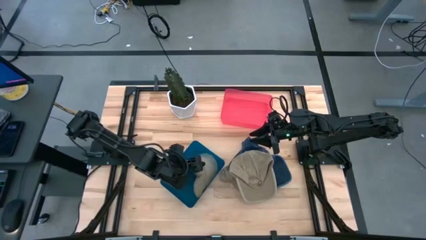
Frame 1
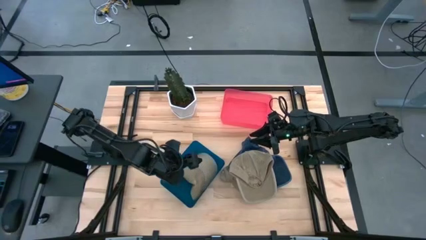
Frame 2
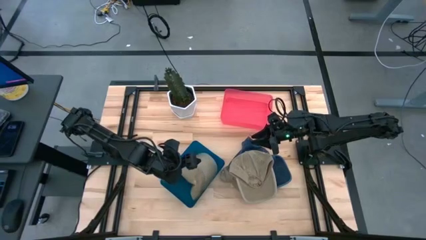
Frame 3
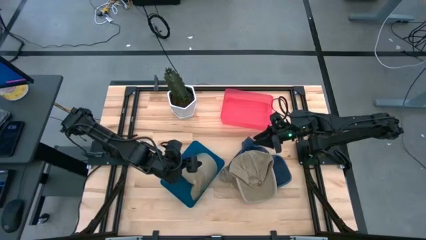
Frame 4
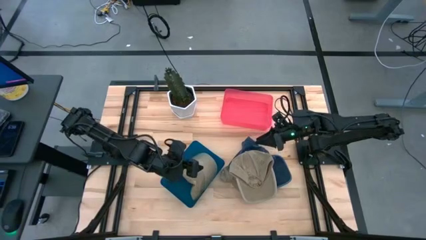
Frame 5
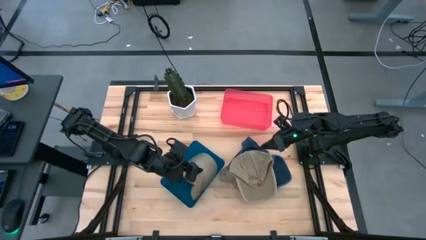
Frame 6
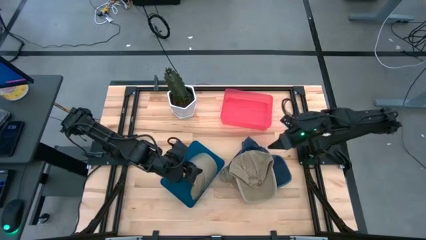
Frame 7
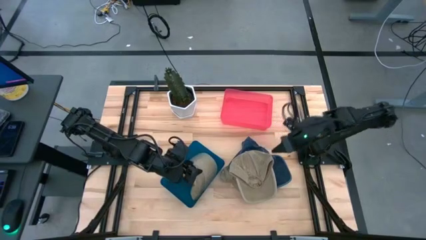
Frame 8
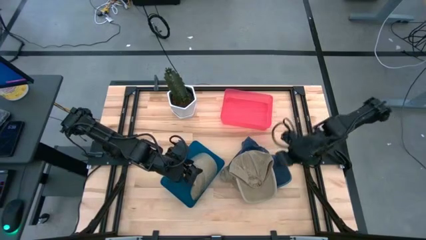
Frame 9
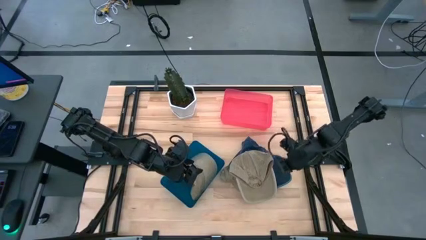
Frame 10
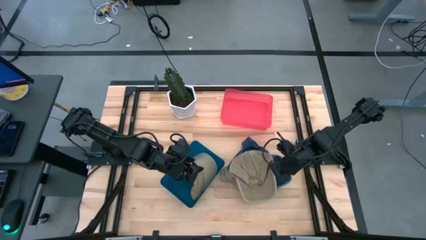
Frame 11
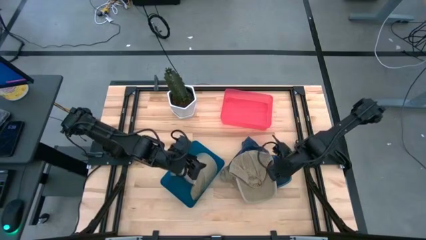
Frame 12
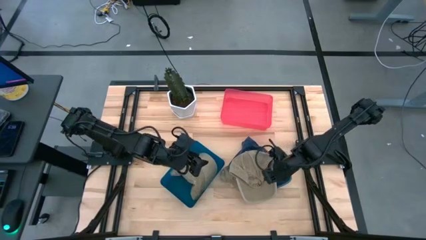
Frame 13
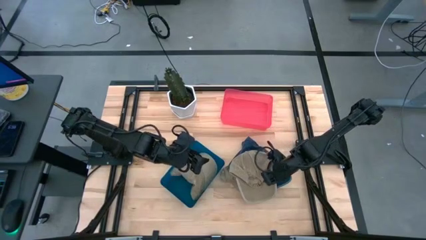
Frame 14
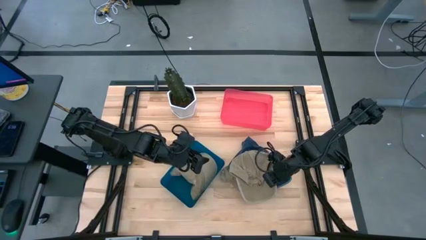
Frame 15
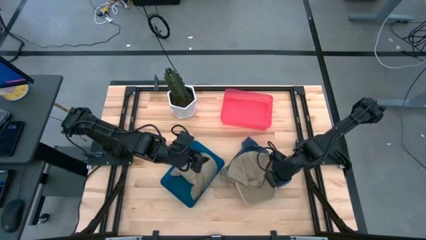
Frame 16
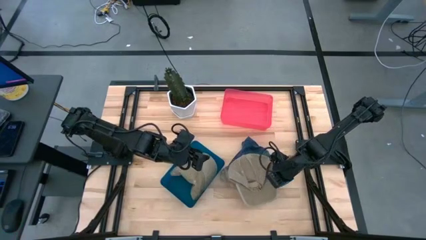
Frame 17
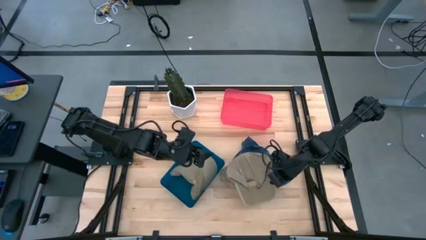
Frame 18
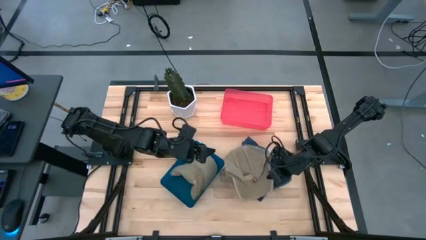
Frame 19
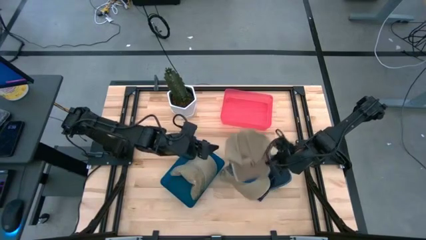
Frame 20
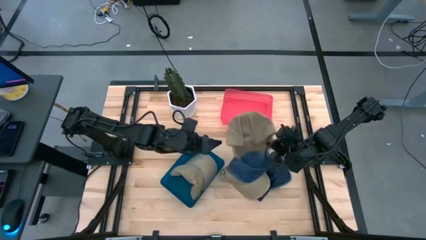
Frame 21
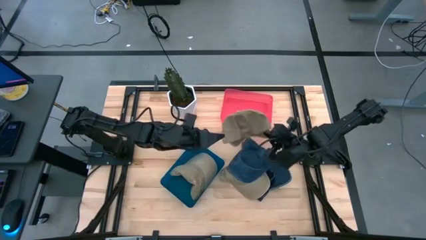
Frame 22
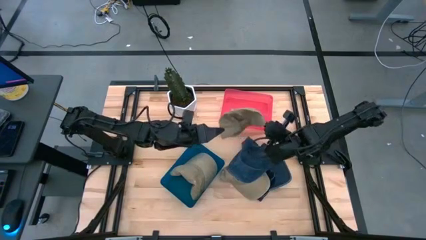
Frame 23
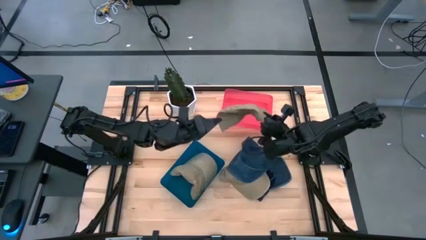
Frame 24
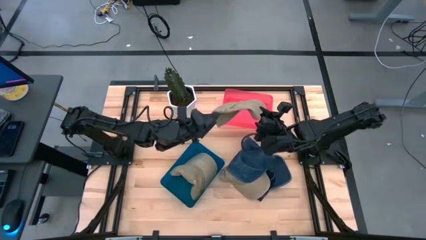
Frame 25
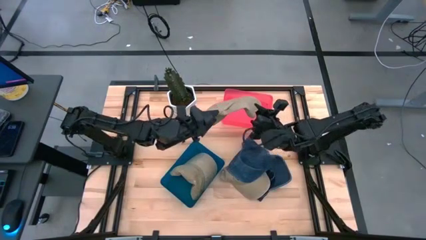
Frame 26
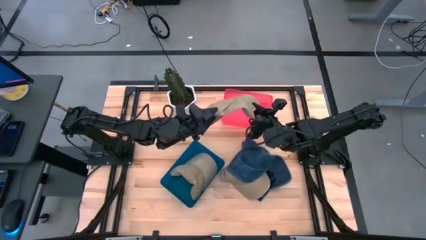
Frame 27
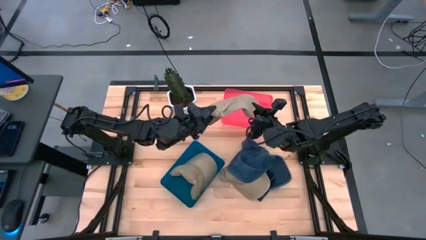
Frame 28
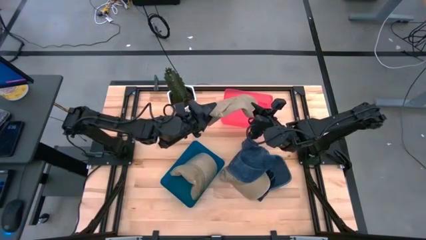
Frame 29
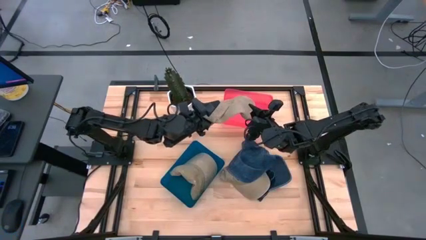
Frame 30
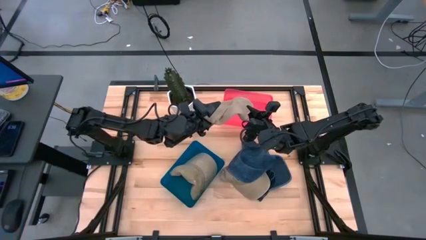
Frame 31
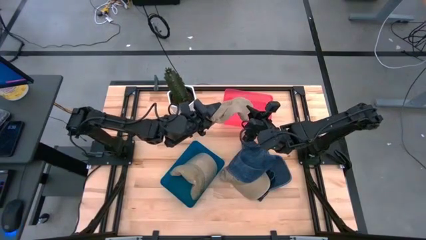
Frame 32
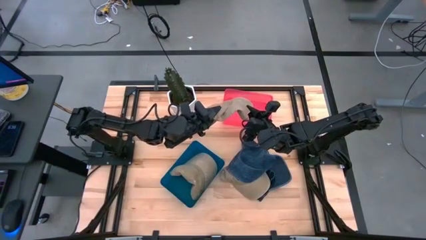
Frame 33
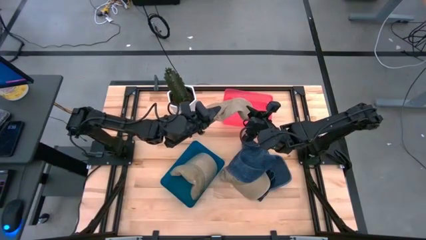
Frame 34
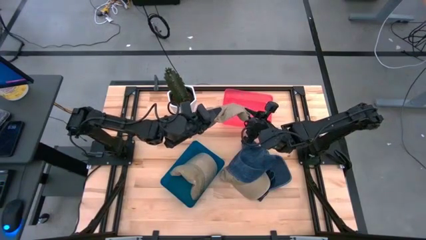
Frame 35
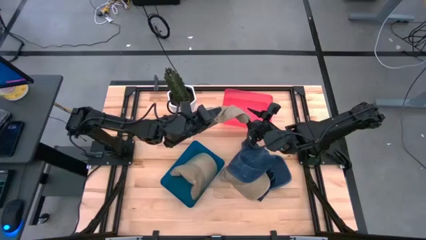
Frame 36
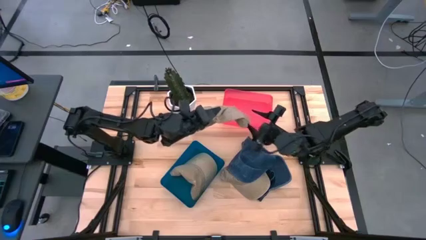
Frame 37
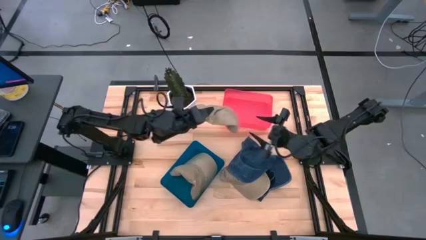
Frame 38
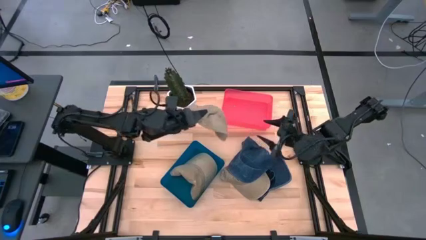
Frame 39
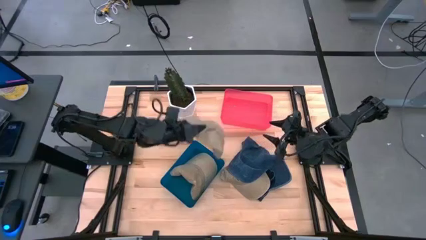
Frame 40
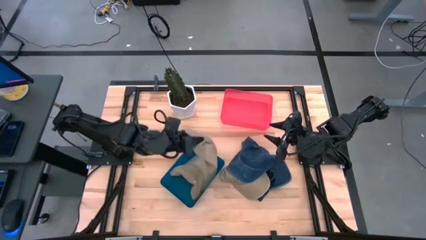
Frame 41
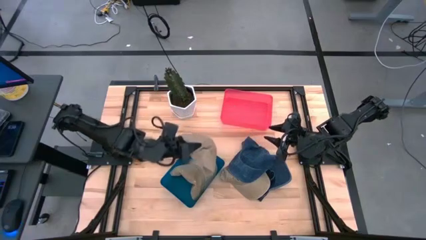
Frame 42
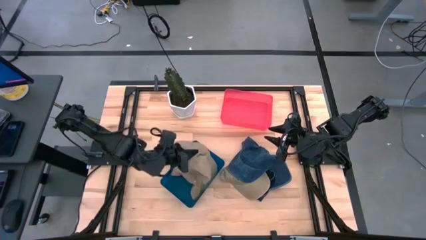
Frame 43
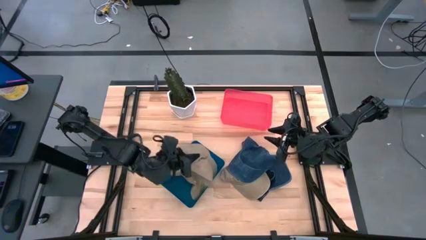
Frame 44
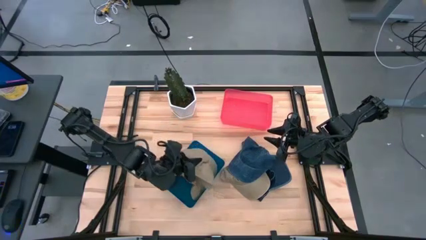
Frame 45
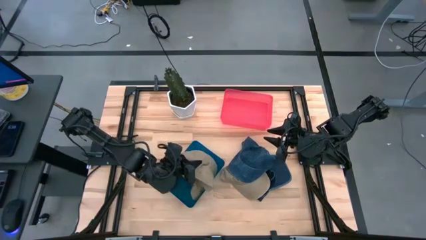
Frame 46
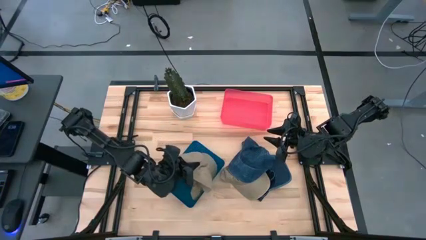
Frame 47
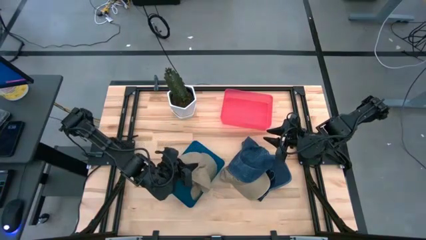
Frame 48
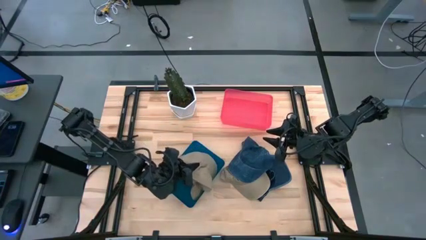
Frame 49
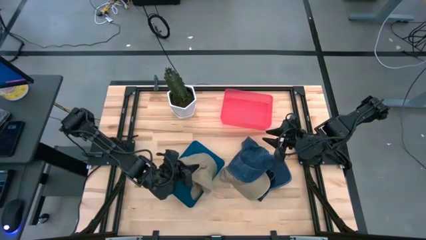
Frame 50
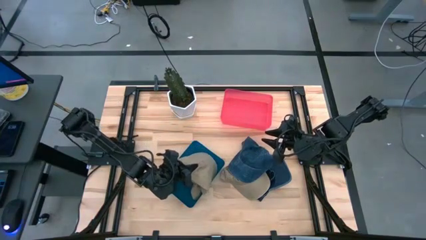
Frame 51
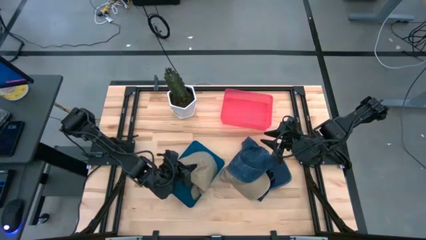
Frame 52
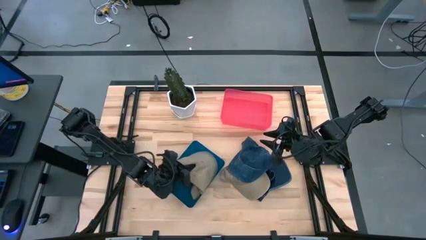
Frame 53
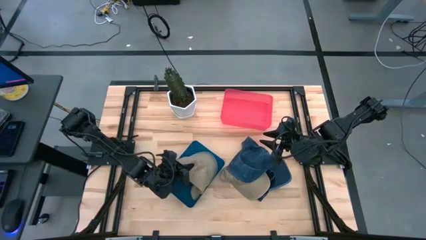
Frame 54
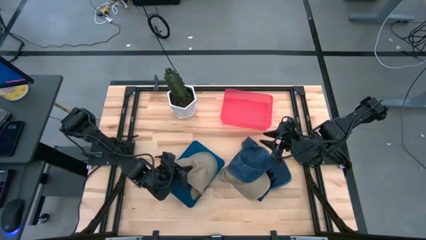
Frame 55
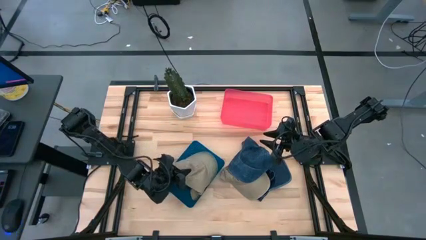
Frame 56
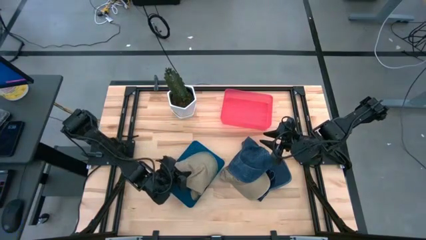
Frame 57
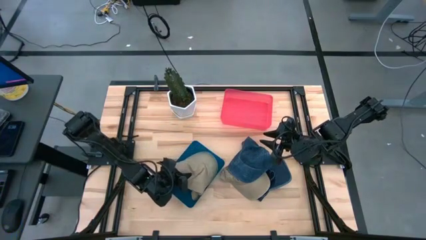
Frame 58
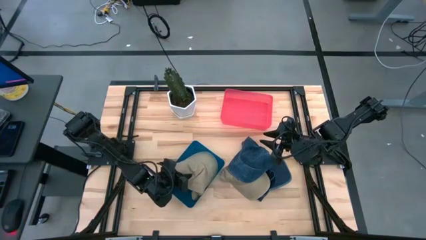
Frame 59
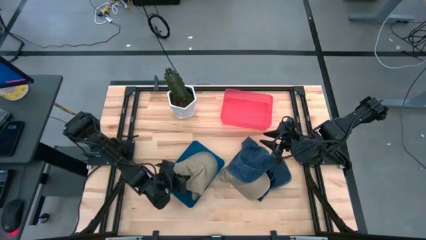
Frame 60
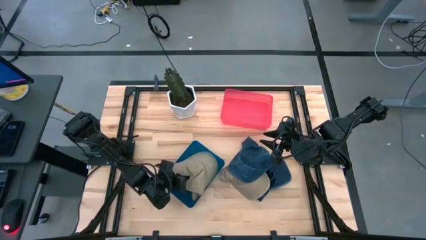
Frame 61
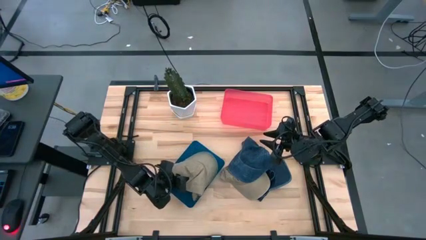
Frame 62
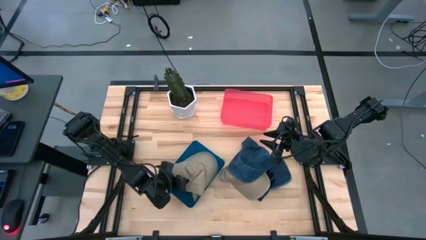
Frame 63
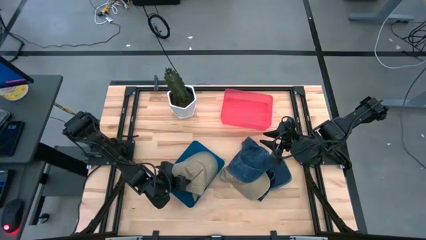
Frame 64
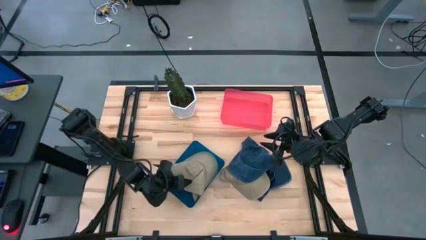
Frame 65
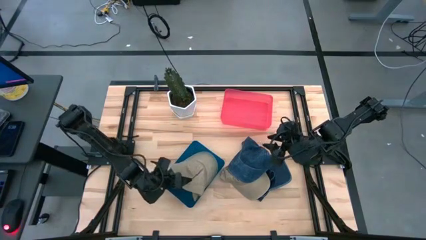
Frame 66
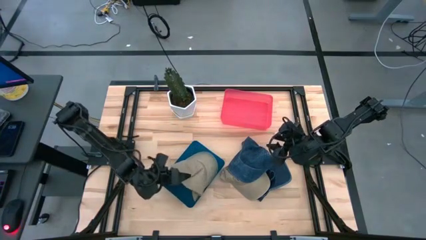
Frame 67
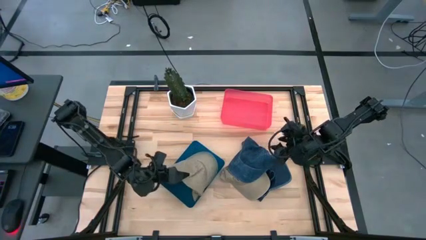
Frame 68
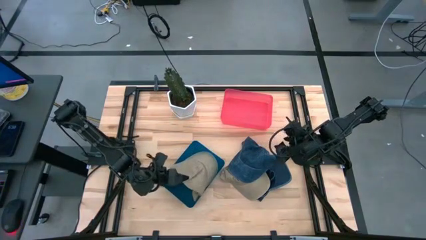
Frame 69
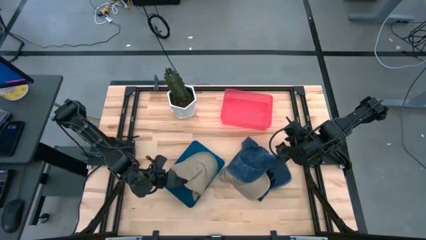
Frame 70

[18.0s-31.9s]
Task: Pick & Place hat
Put the brown cap into the blue bin

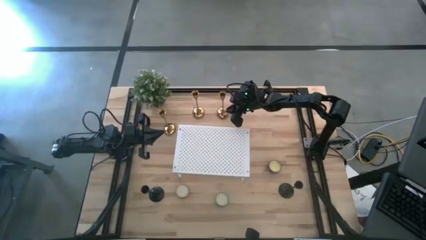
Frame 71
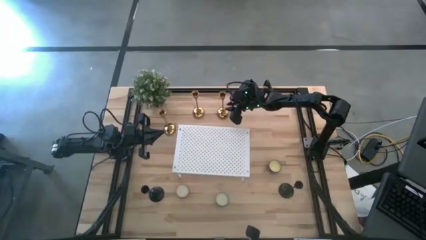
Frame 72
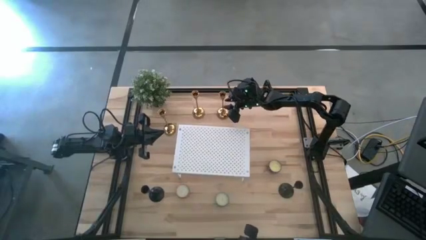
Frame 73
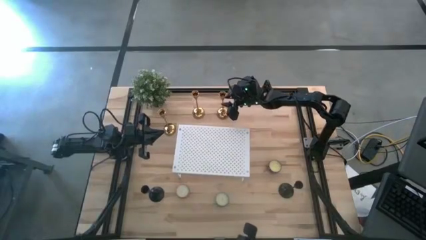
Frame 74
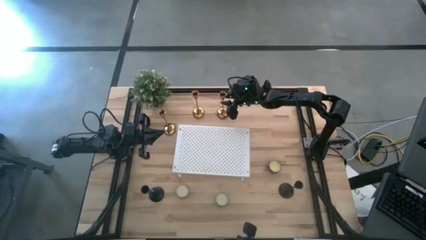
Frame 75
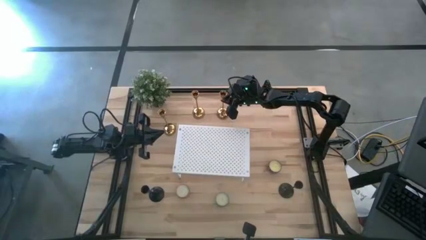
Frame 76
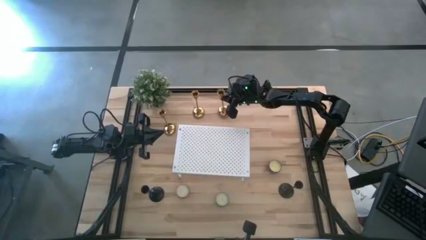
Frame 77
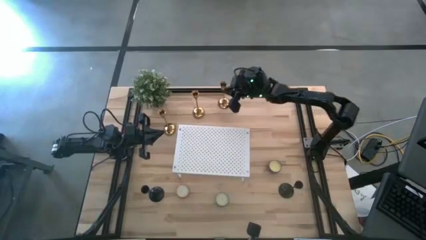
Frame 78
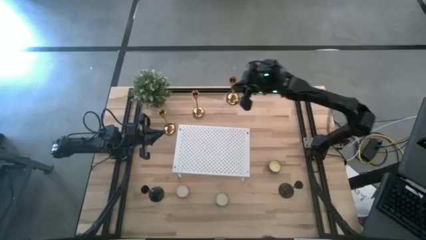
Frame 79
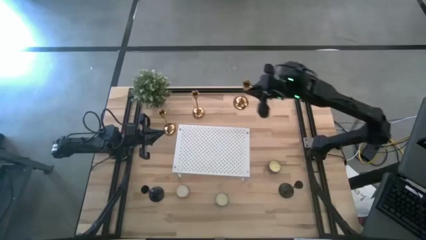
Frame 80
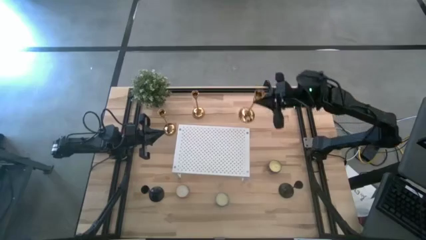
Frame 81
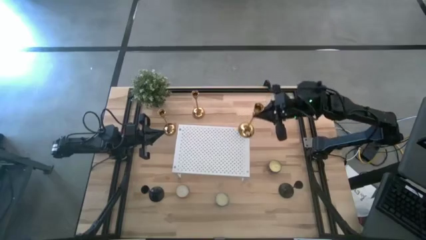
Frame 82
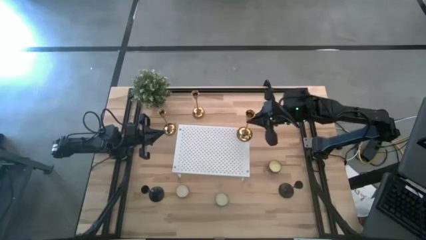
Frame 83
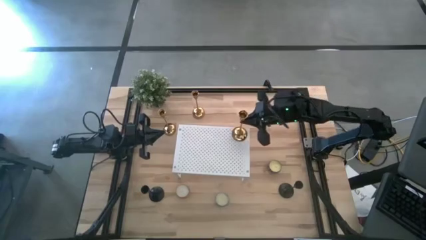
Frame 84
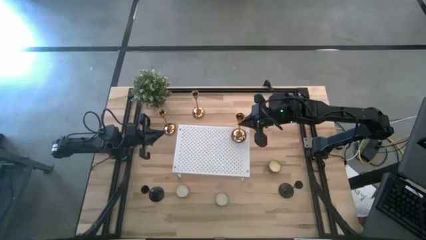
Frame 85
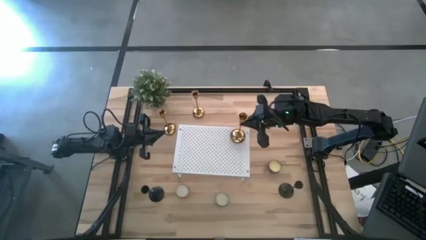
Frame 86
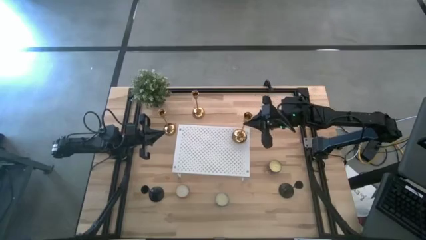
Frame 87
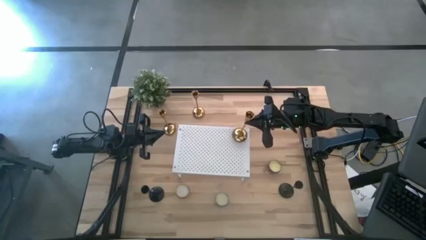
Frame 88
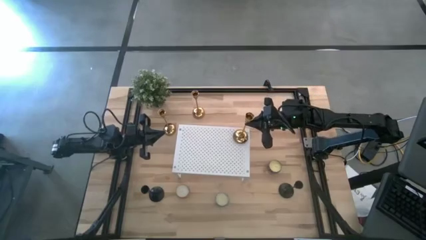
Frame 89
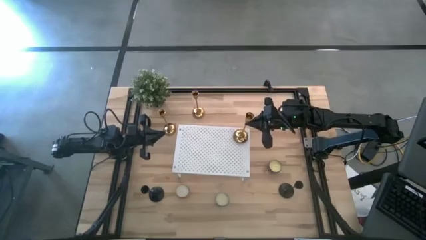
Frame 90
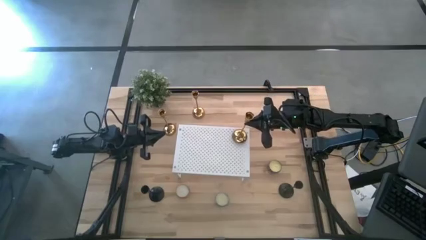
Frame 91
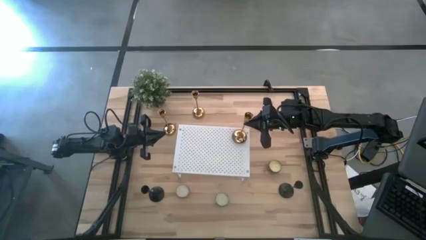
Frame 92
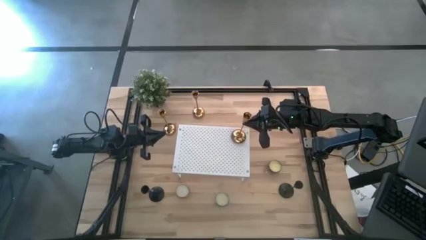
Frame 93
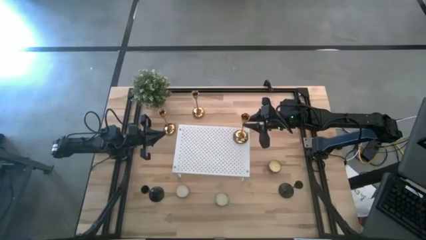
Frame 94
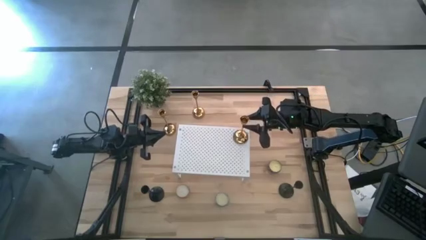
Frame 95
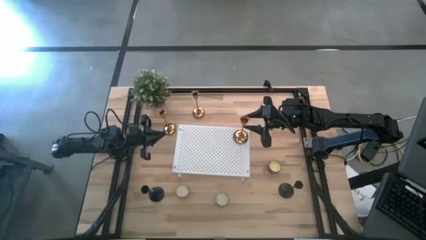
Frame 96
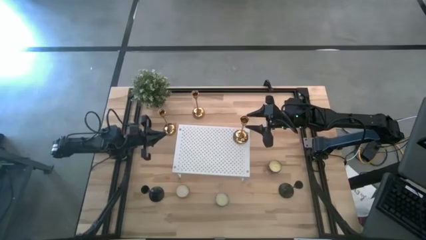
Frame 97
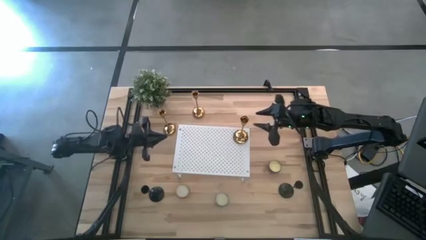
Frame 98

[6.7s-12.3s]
Task: Pick & Place candle stick holders
Put the top right golden candle holder on the shelf
